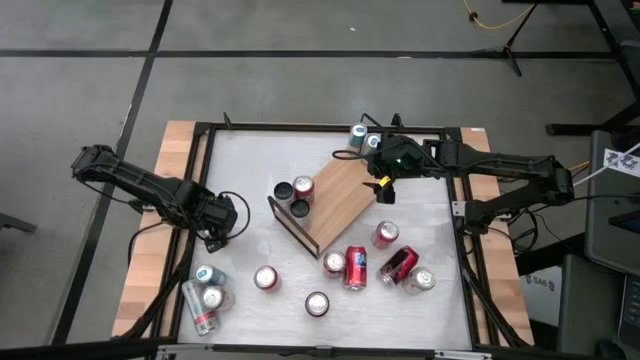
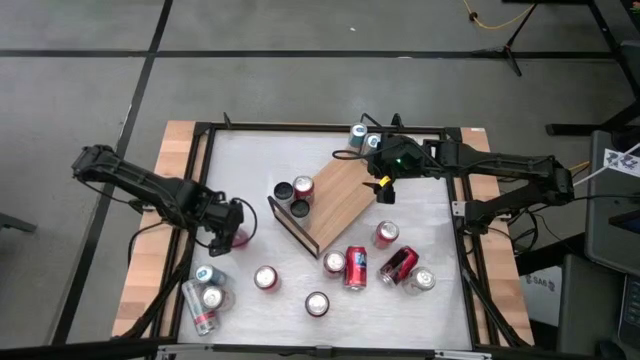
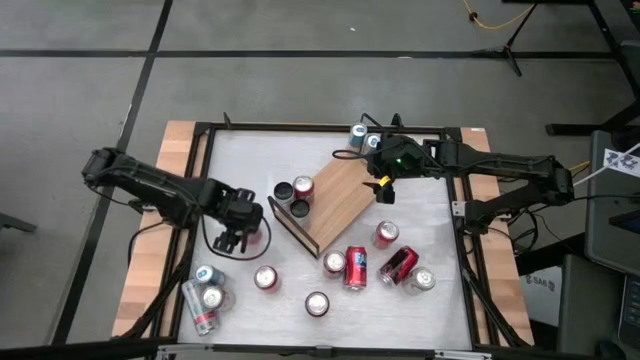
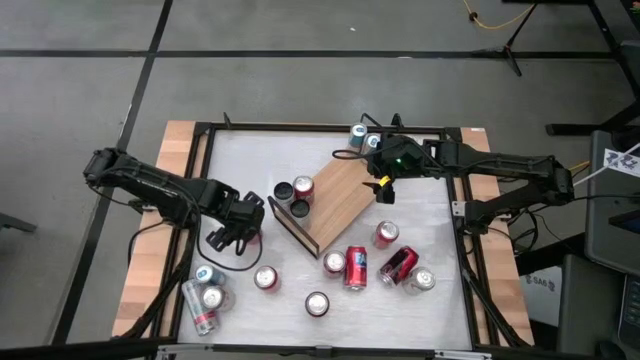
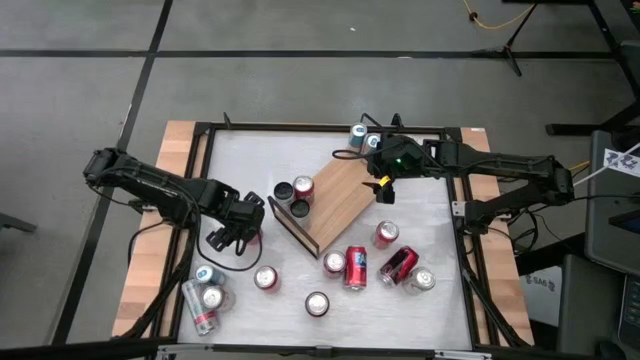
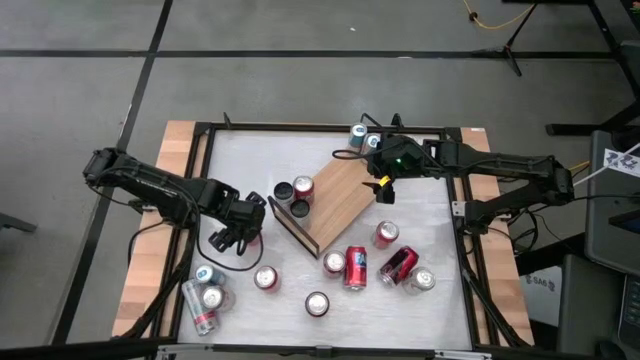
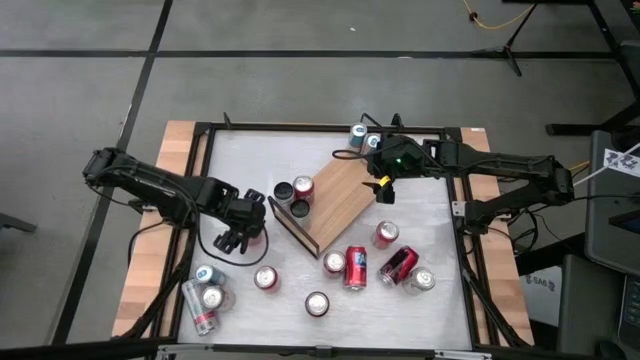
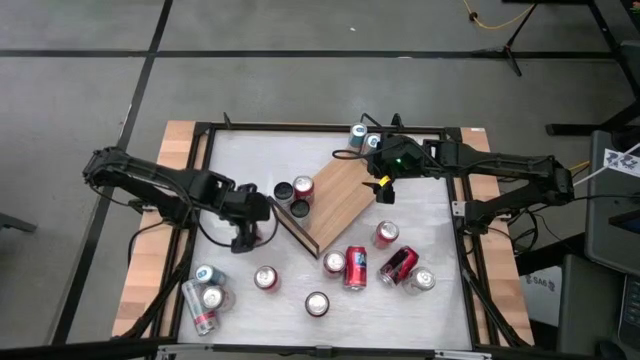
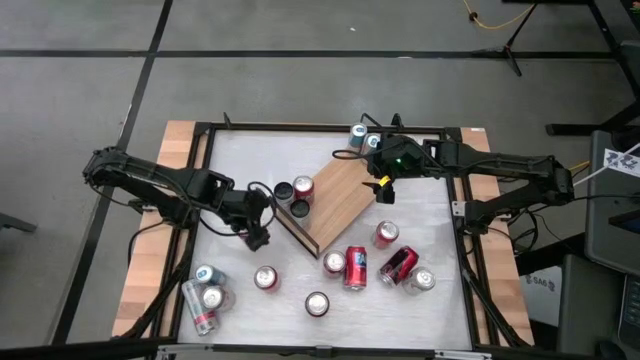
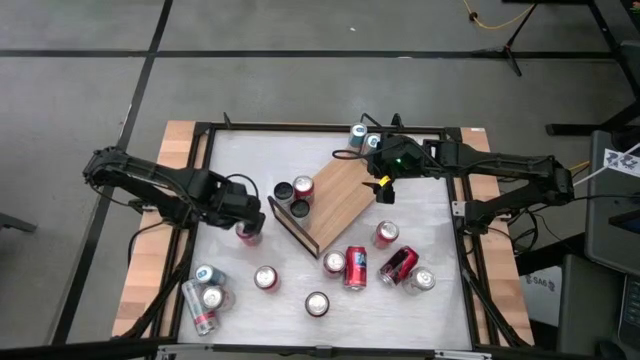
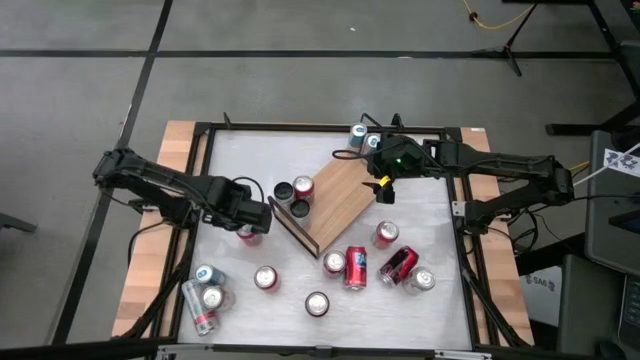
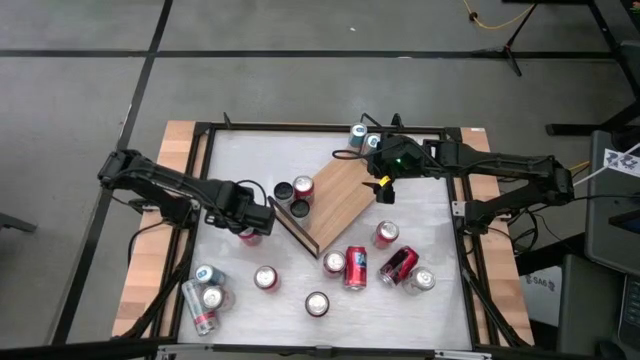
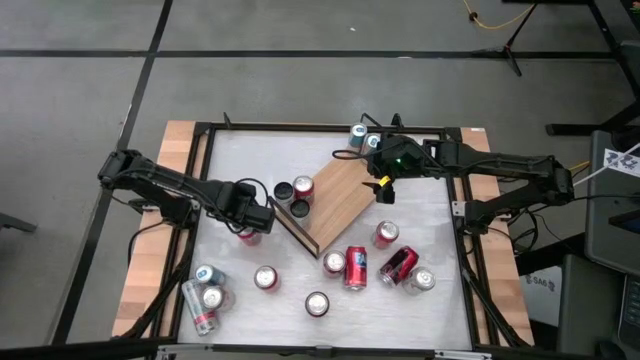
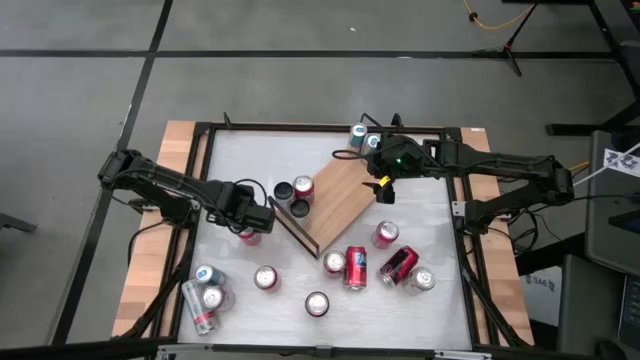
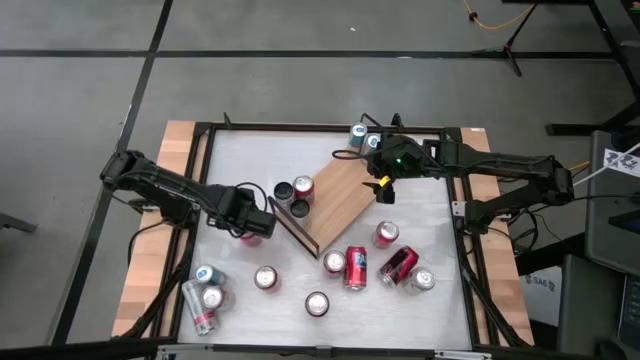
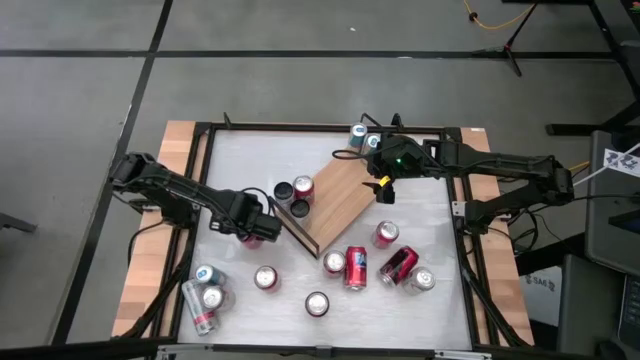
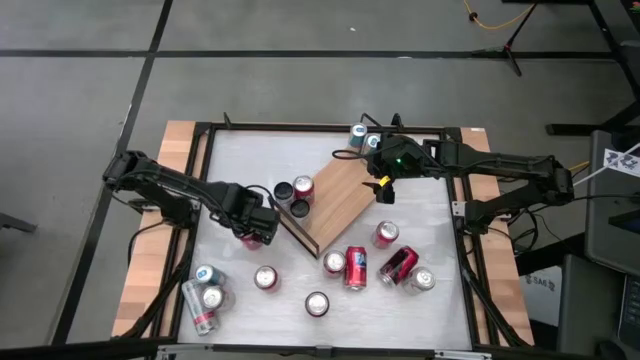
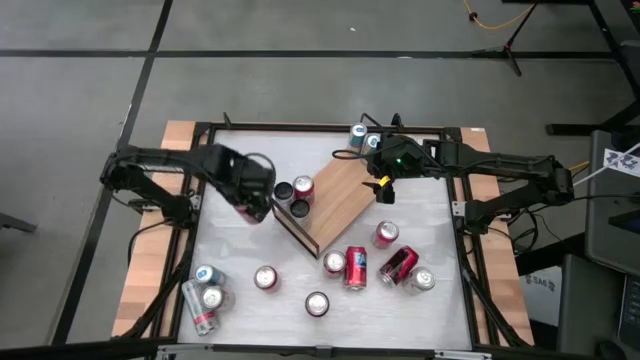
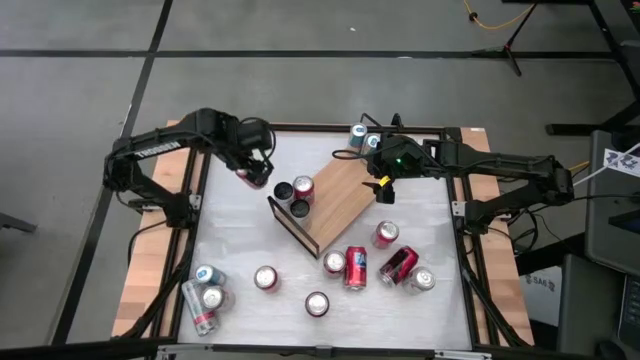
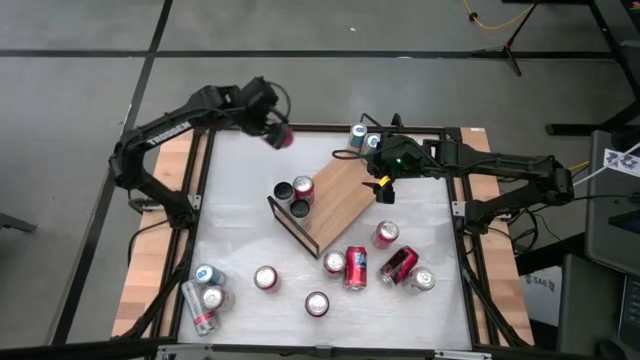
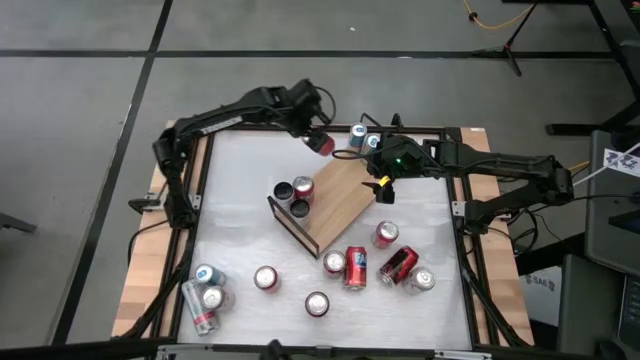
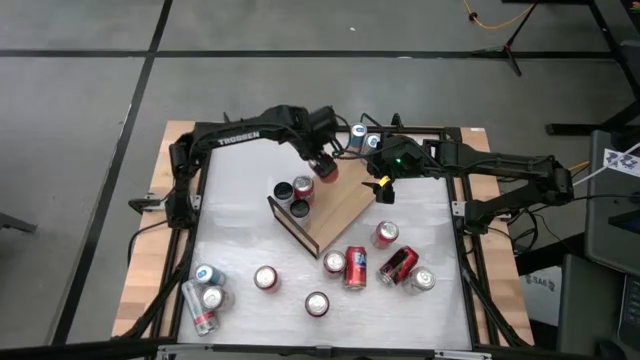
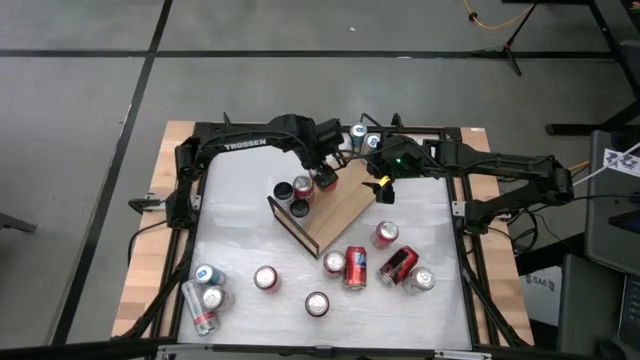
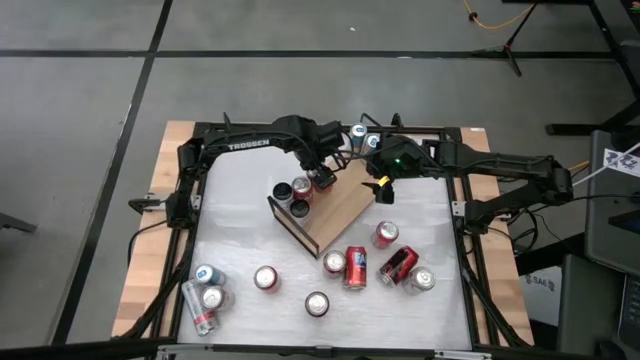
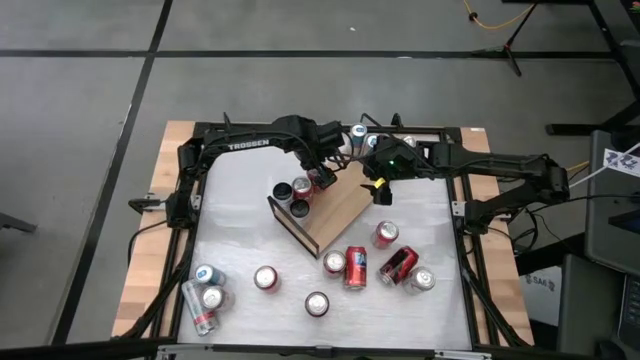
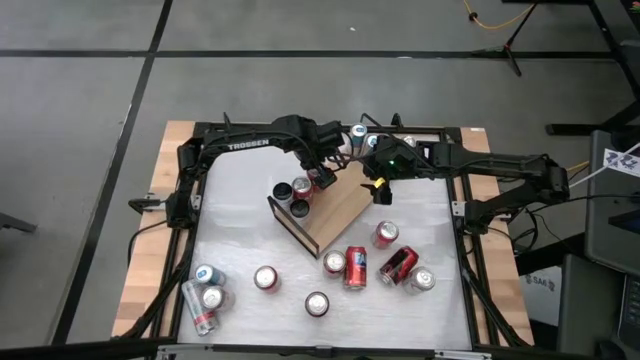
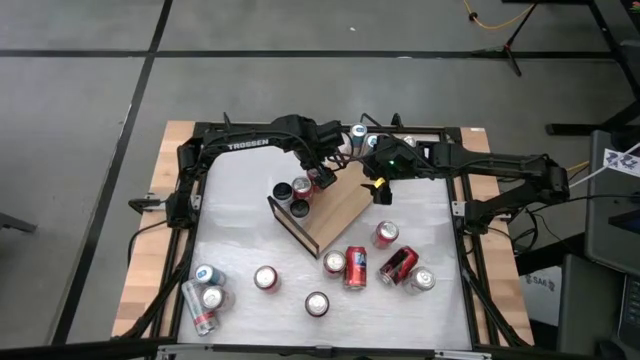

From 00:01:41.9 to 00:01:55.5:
Task: Place canned beverage on shelf
Put the orange soda can on the shelf

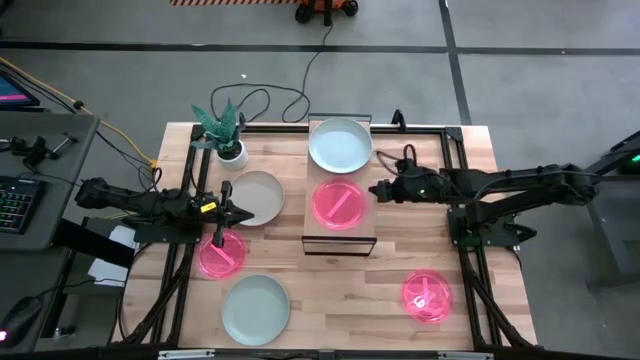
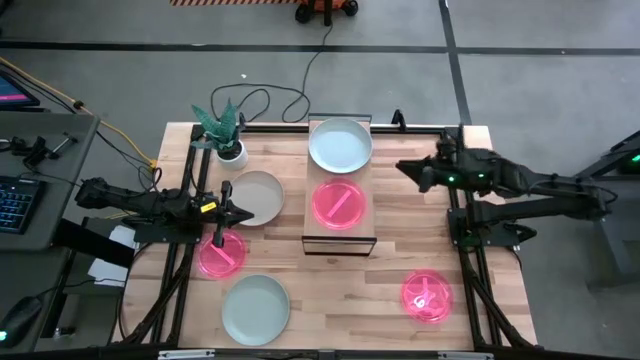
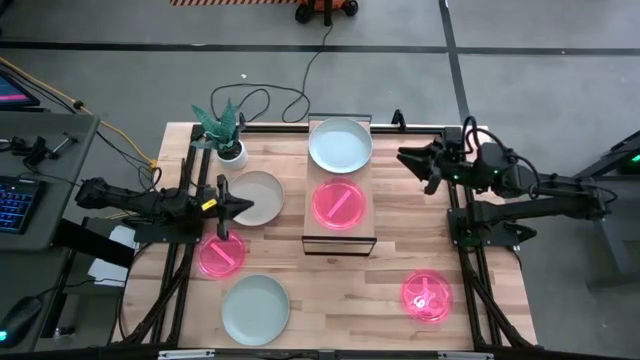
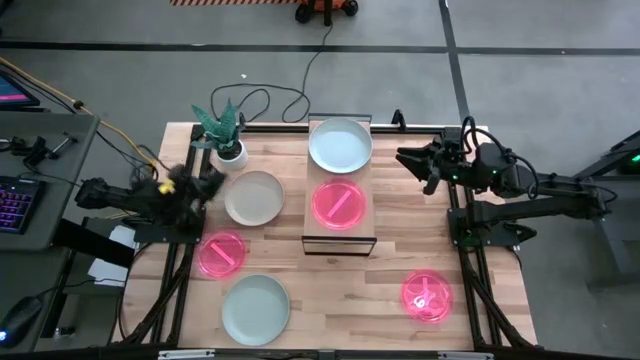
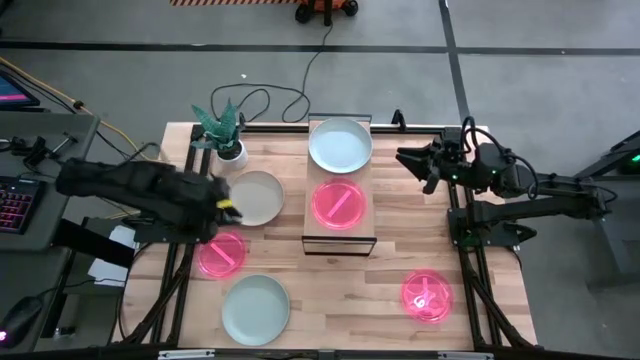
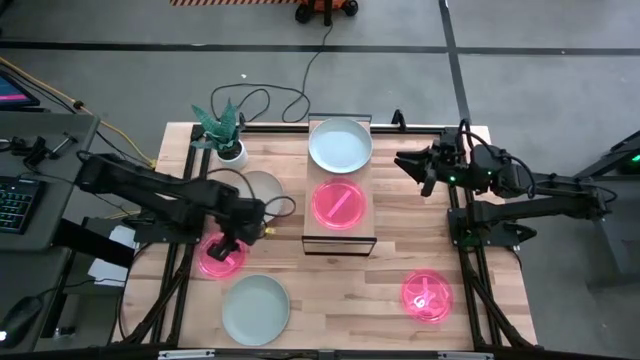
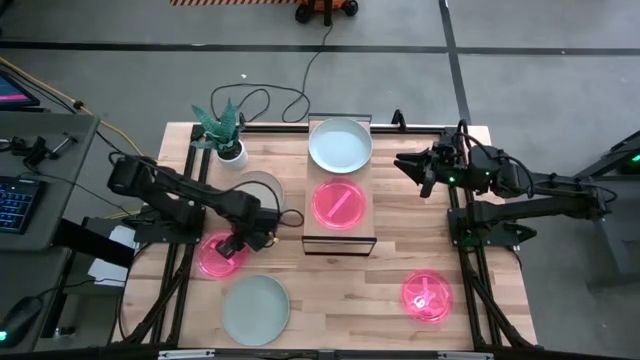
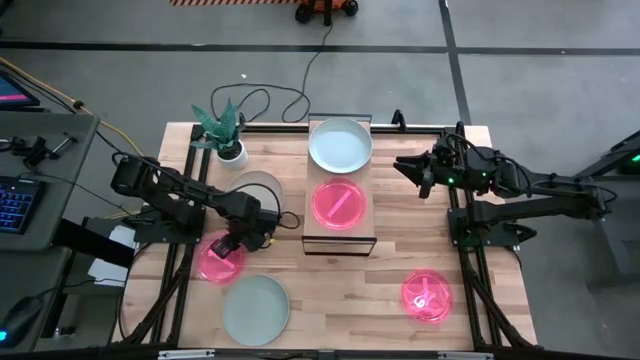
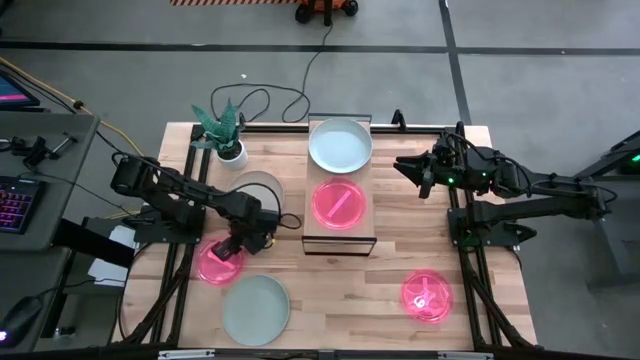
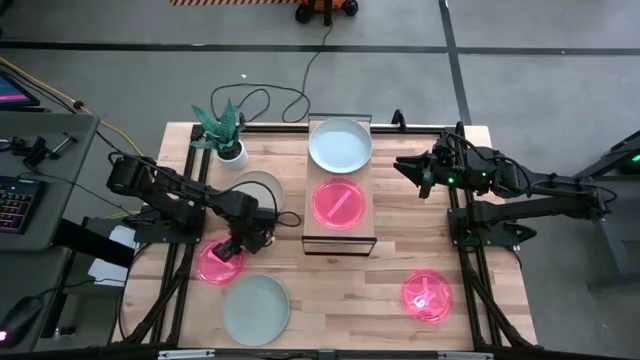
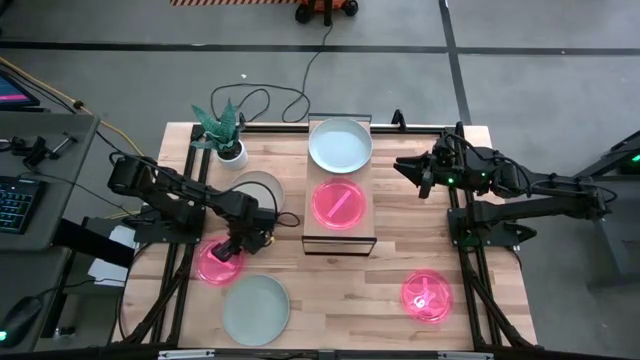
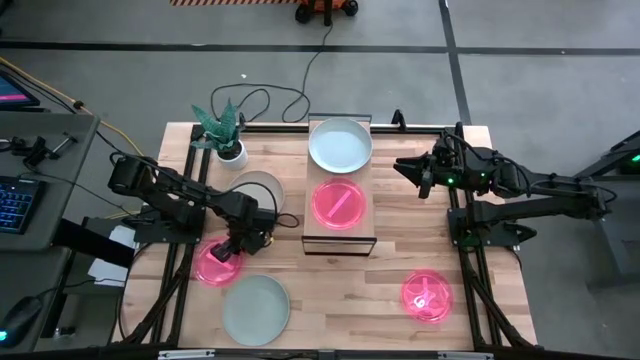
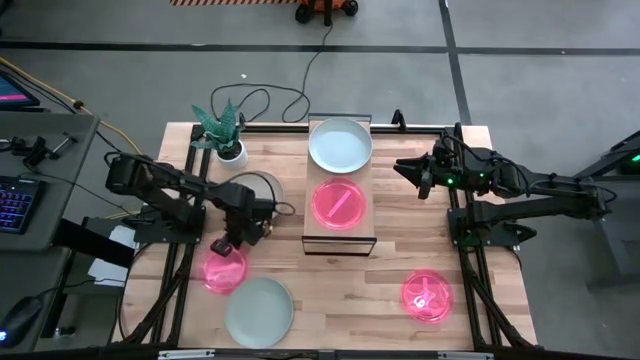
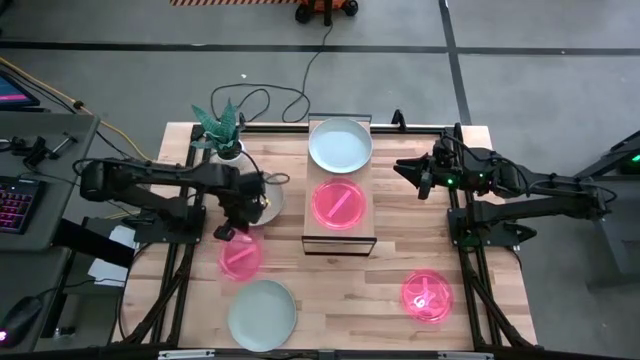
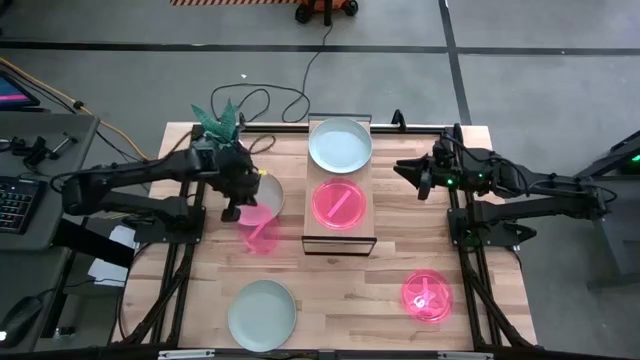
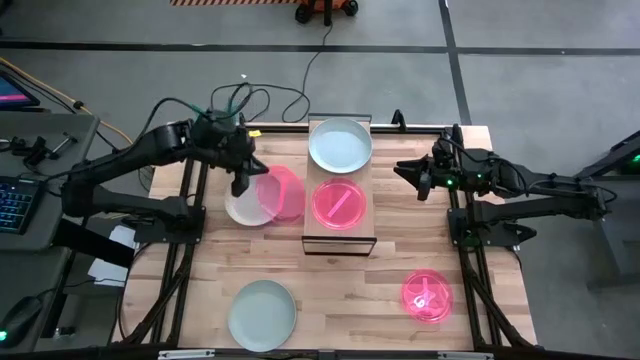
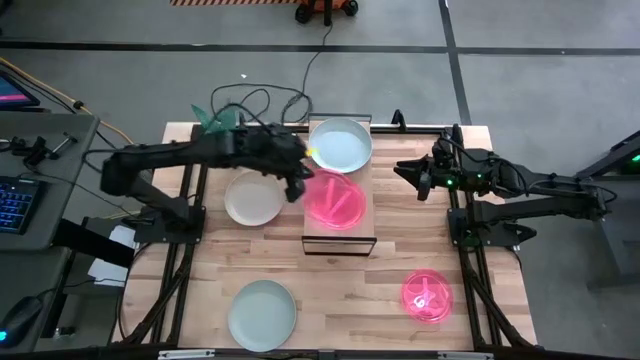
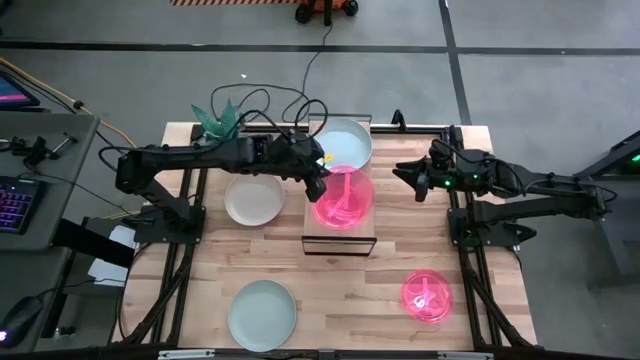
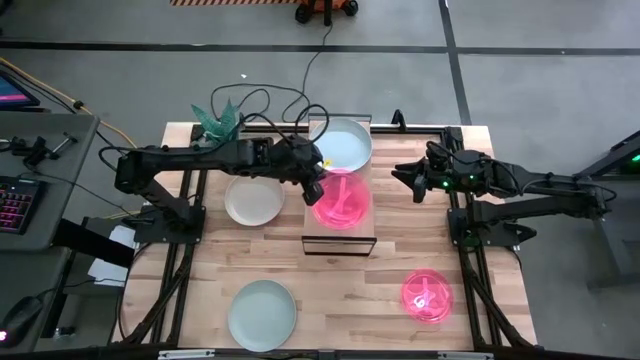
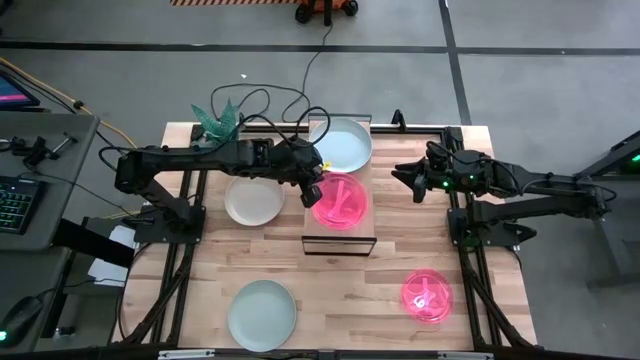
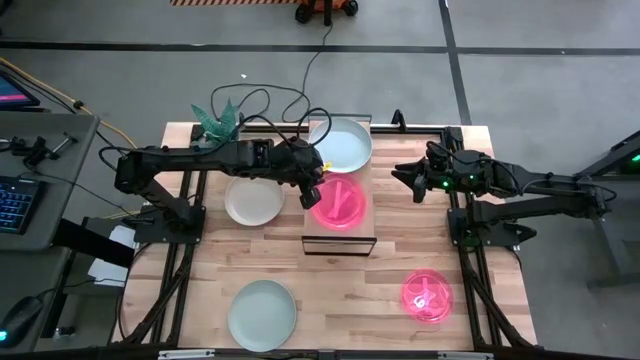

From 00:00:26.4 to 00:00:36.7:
Task: Place and stack plates onto a shelf
Stack the top pink plate on top of the pink plate on the shelf
